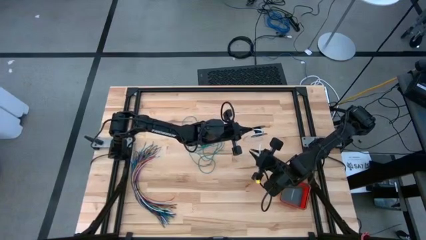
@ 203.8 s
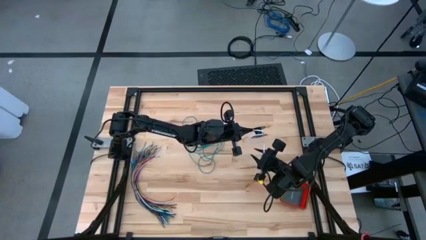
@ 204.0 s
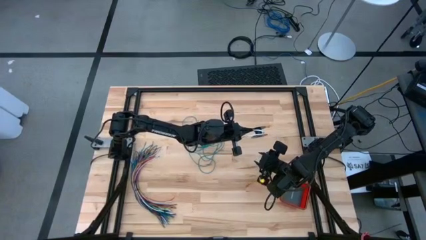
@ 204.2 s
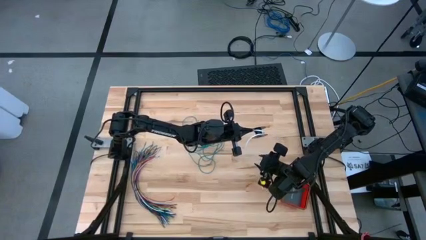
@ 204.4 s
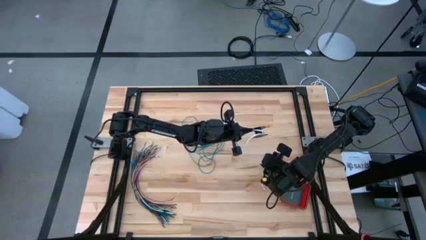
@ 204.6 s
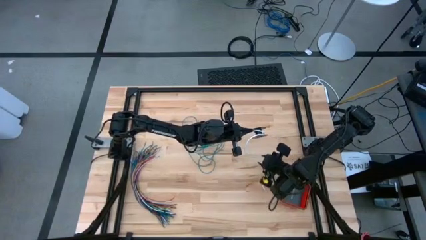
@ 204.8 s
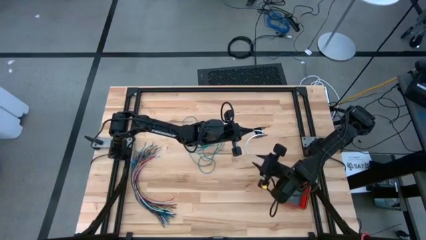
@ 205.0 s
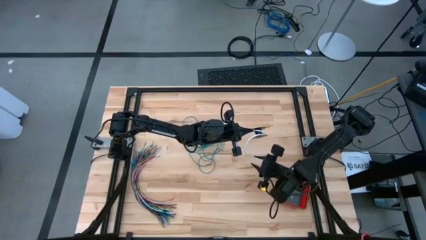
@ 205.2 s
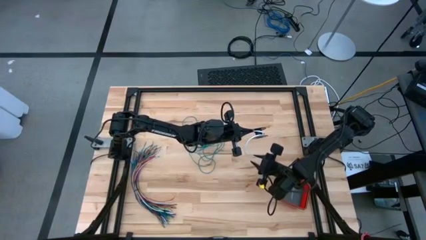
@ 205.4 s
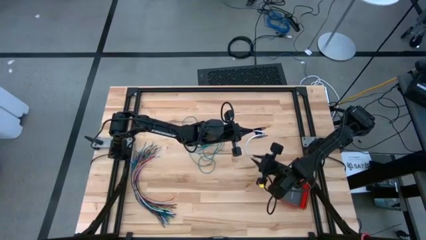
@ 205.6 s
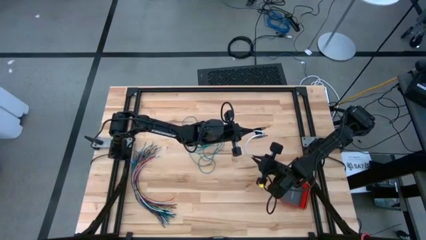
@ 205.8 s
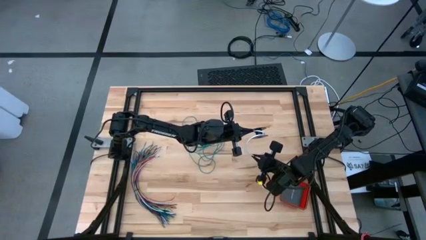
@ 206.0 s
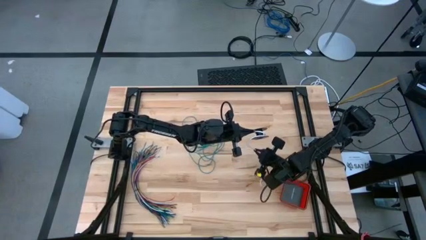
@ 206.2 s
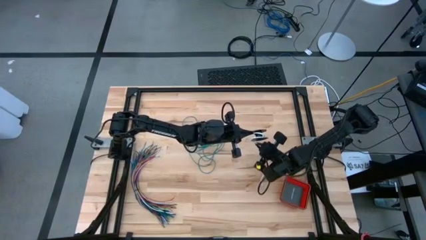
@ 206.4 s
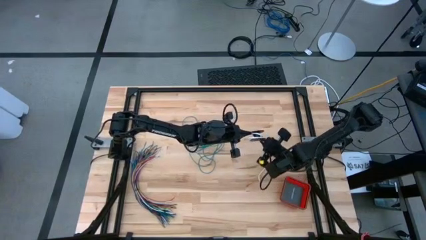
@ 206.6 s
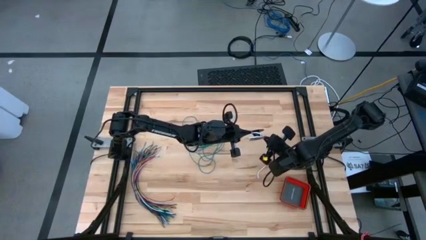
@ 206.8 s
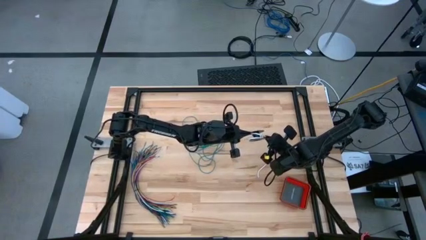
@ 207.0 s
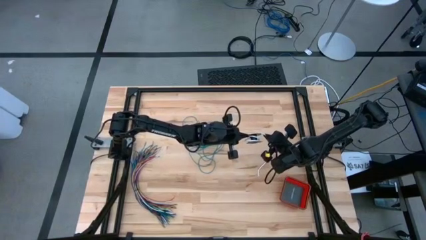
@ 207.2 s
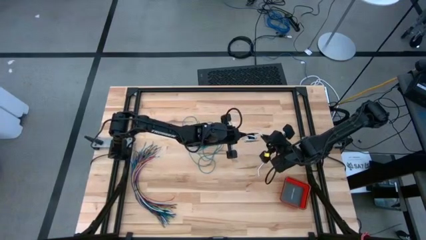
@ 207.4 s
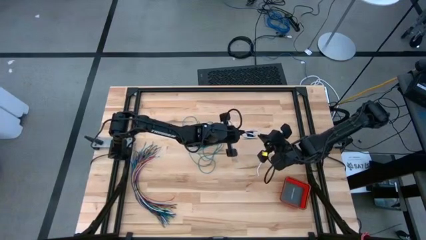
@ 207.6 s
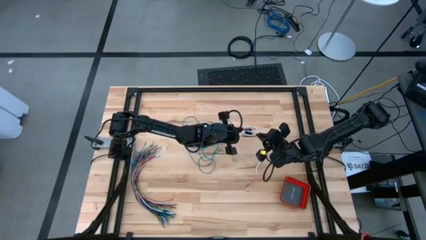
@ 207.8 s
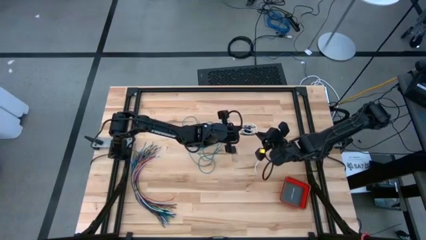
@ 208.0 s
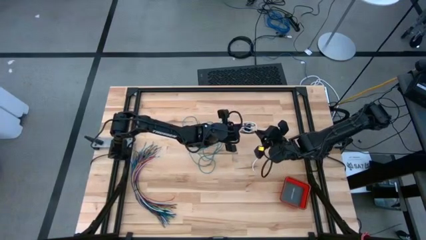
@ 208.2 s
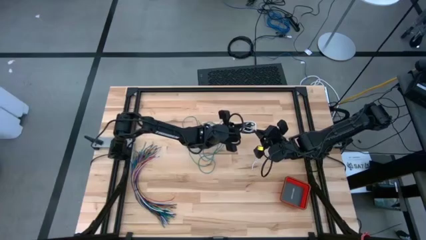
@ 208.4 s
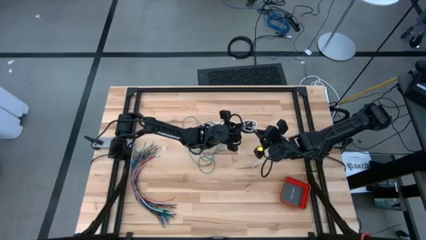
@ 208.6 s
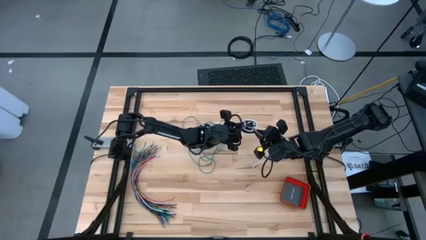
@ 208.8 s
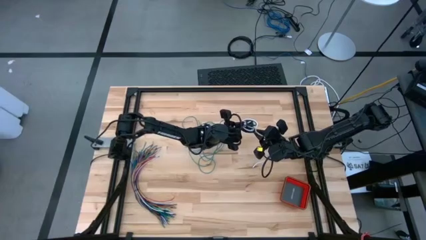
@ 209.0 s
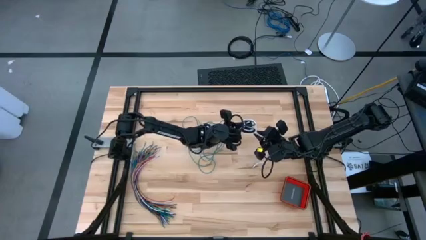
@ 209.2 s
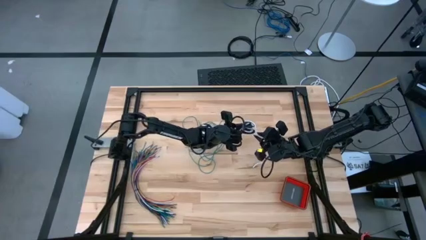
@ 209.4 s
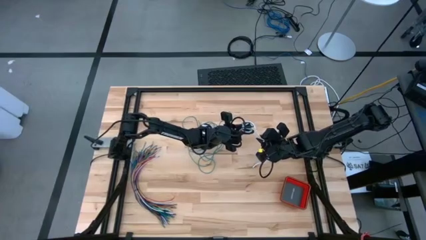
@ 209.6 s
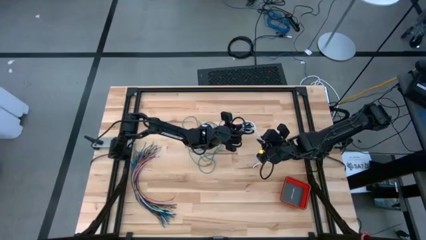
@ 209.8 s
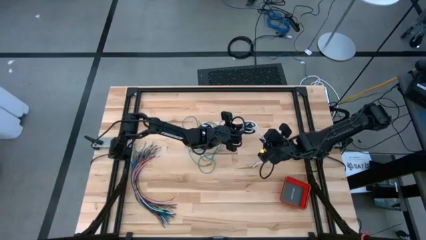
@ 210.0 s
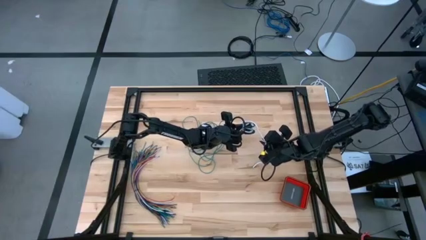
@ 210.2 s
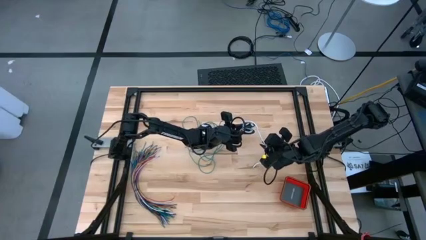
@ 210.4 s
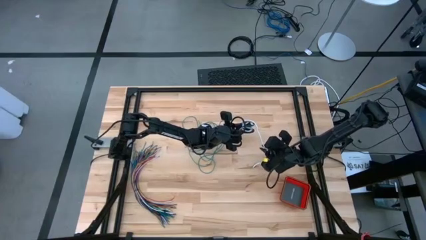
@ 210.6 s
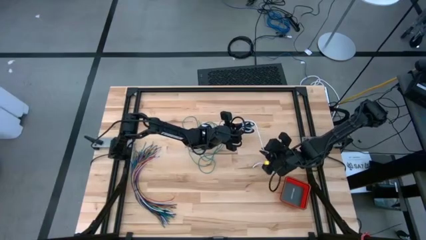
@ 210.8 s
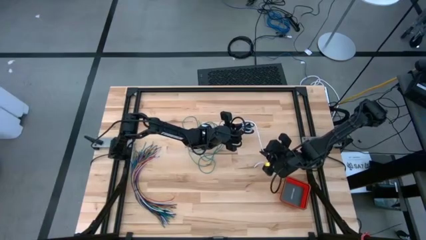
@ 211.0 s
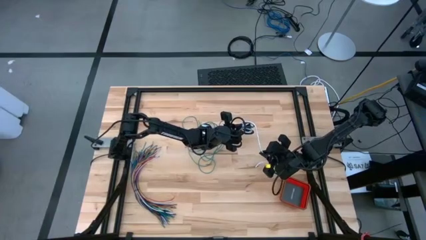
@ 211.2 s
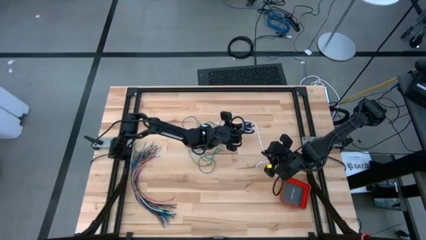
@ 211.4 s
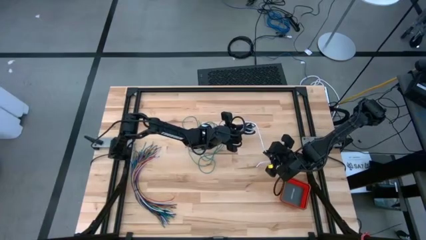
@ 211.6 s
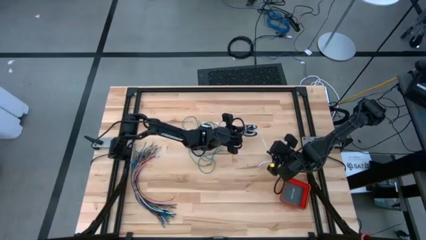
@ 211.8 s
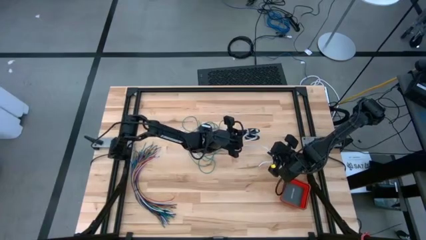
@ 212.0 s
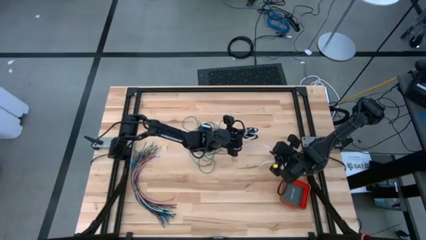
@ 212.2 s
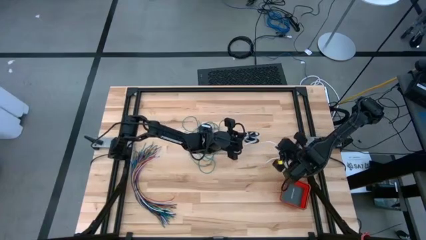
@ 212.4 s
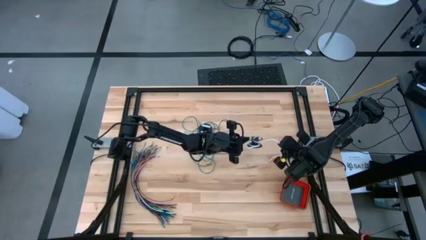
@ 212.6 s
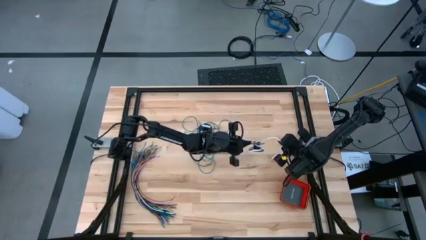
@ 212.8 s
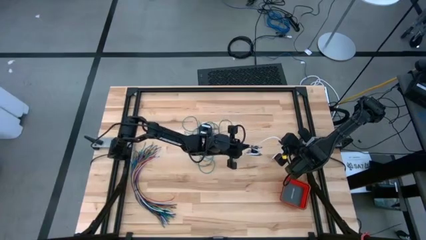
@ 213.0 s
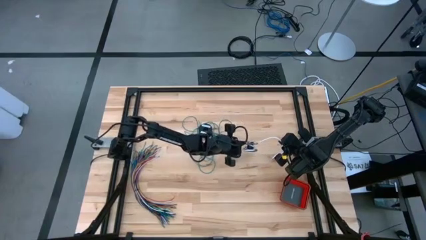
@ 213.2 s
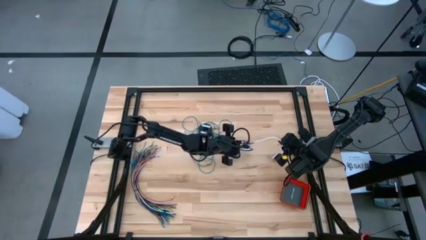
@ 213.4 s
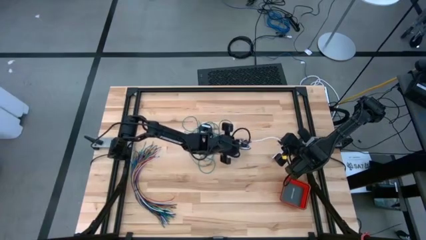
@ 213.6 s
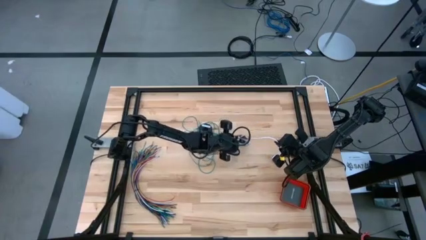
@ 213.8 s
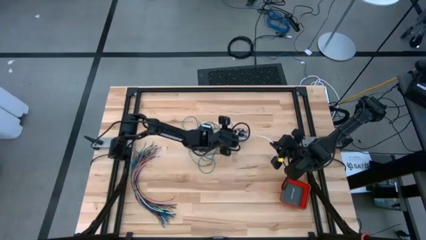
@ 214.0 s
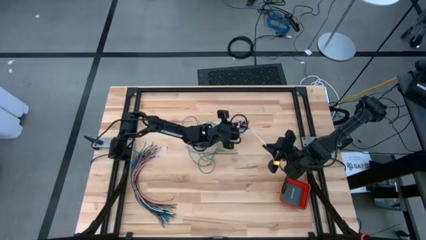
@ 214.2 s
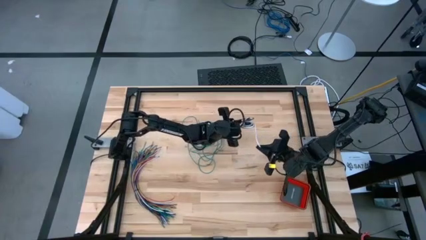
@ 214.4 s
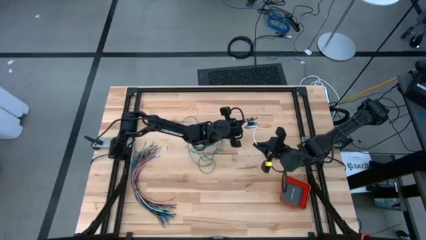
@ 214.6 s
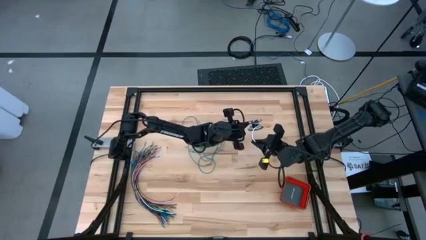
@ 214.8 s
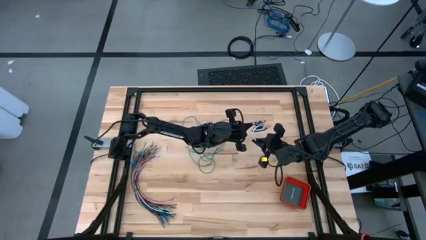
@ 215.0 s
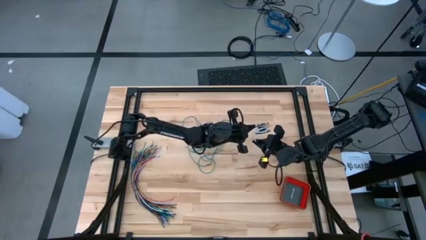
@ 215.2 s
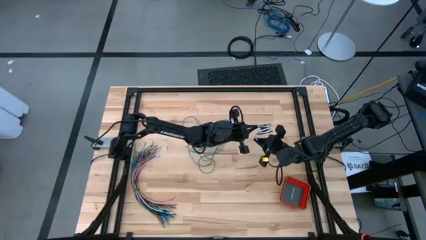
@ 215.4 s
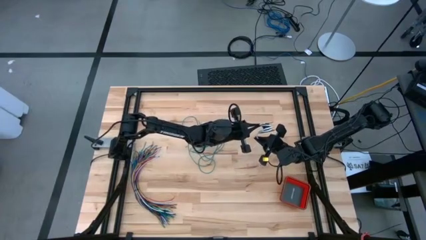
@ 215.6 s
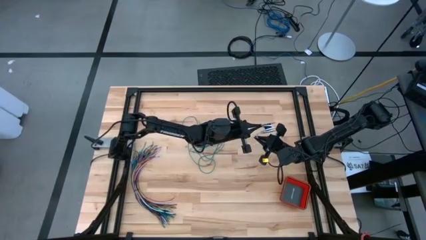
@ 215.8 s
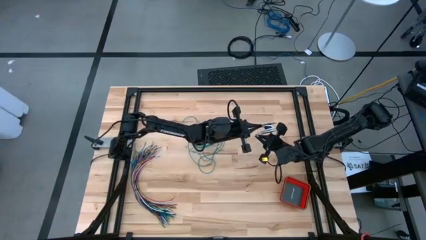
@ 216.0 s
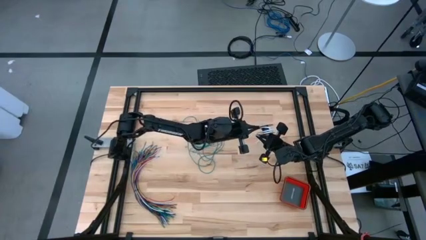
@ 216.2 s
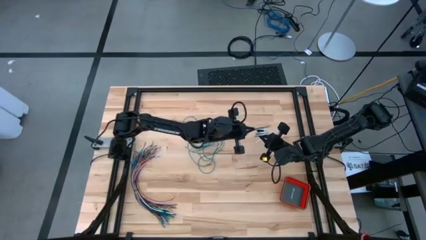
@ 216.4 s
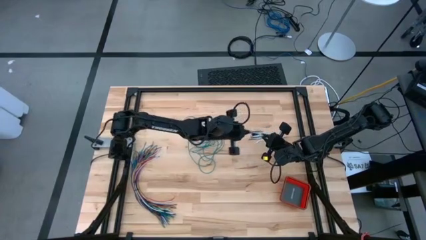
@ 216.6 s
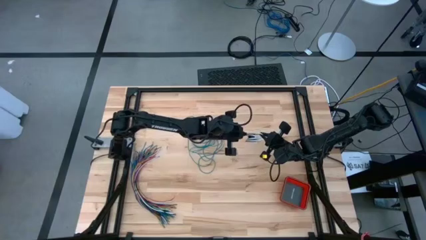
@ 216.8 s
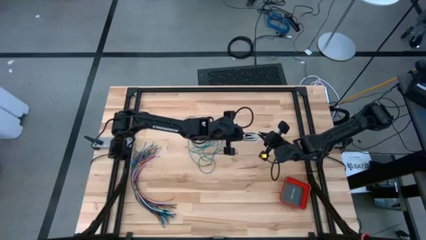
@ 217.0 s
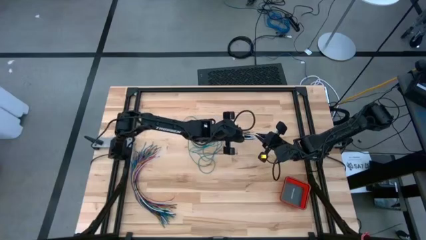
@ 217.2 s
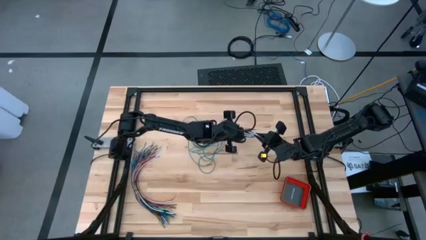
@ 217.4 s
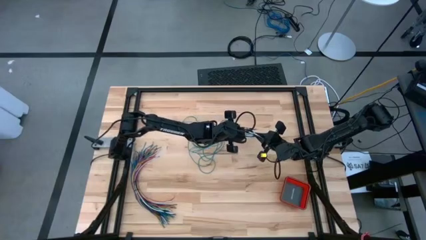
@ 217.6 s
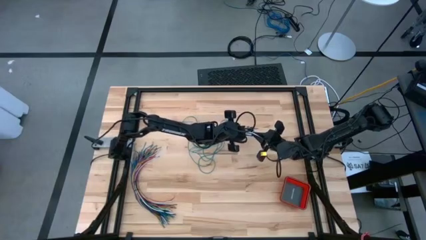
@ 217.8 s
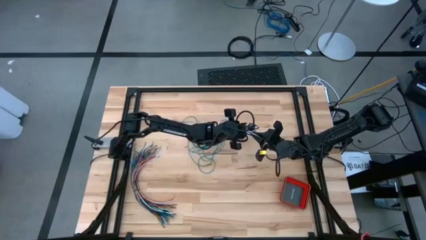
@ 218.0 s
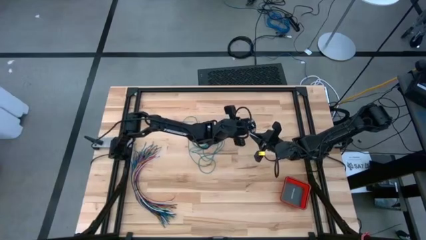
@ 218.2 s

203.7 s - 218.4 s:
Task: Coil cords
Coil the white wire onto the spool

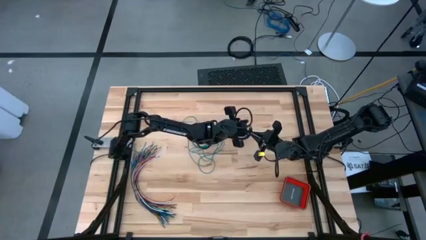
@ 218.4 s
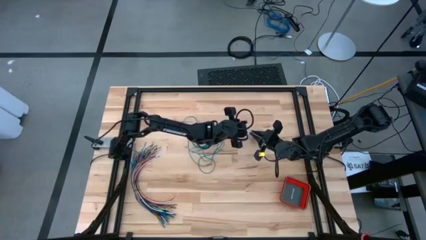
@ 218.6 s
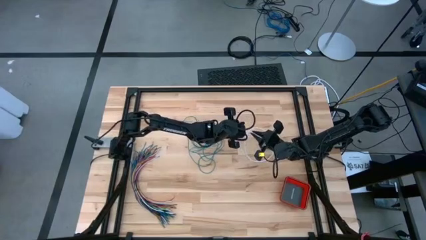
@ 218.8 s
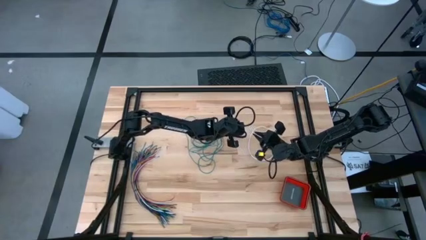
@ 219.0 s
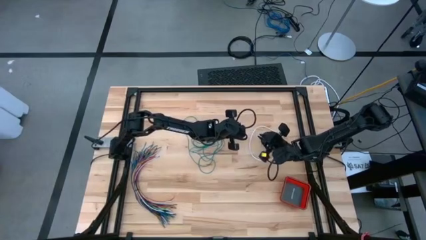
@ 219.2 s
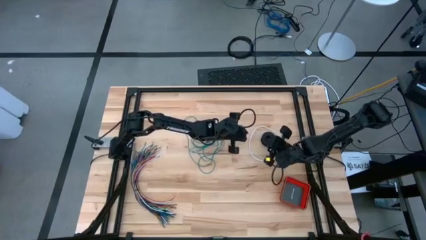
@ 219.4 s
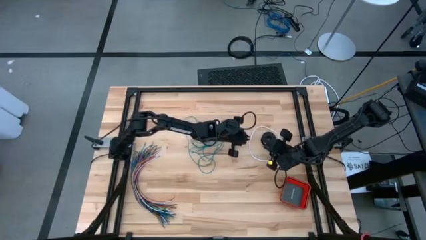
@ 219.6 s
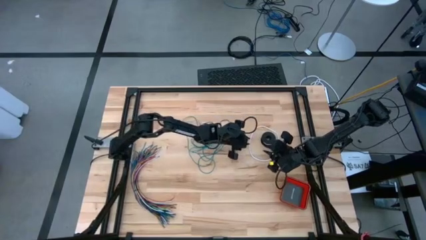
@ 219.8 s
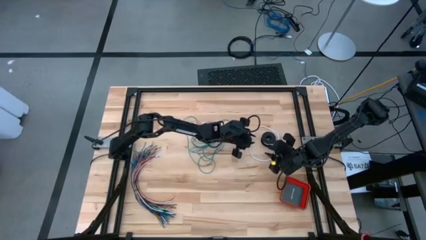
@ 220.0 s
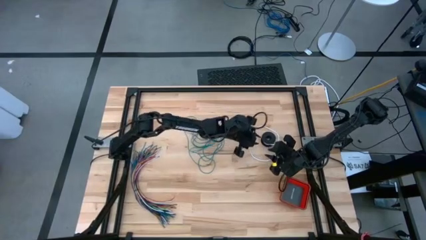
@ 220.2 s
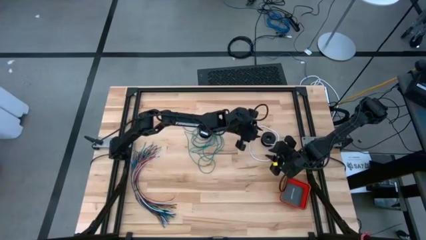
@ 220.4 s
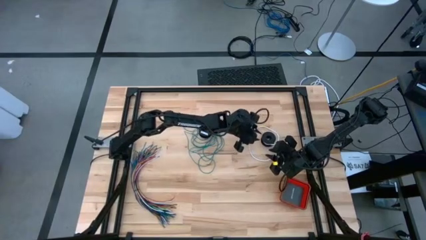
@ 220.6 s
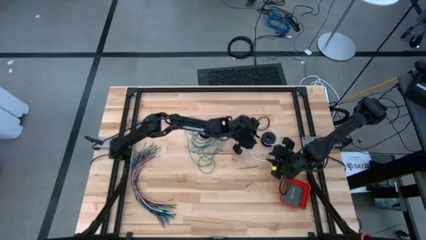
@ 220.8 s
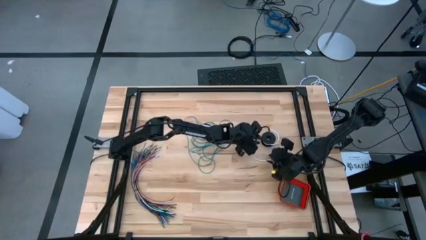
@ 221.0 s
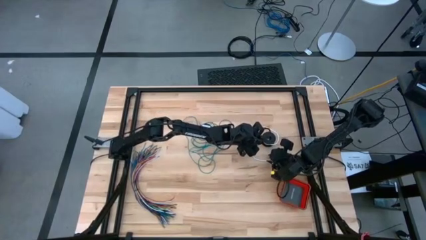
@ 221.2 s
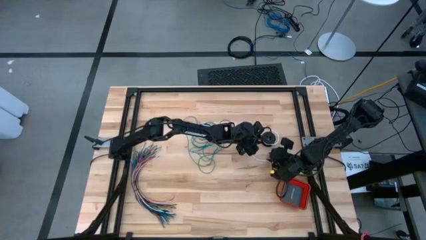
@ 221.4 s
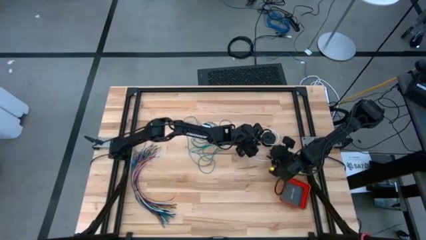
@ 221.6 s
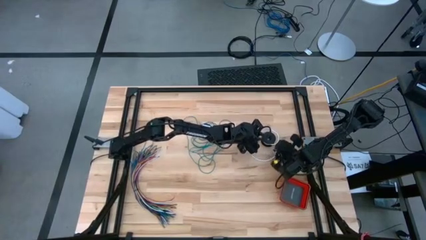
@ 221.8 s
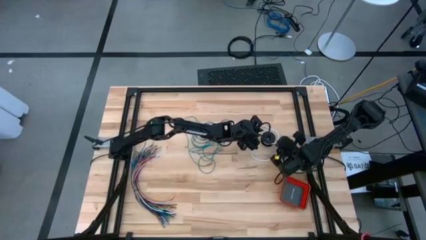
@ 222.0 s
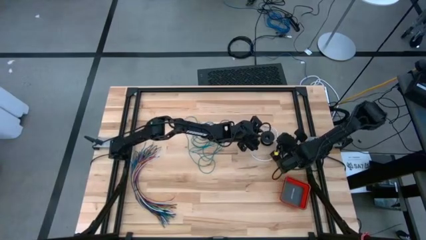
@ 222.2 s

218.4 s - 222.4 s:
Coil the white wire onto the spool
